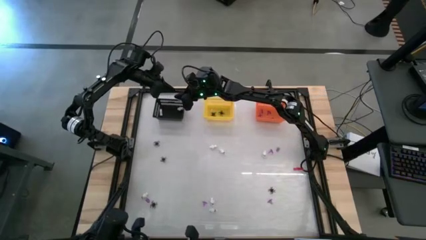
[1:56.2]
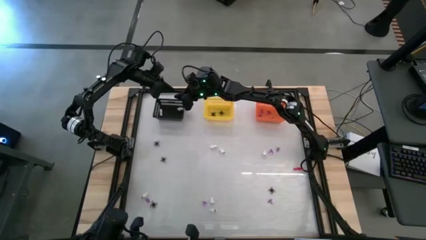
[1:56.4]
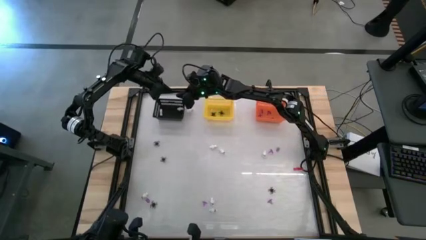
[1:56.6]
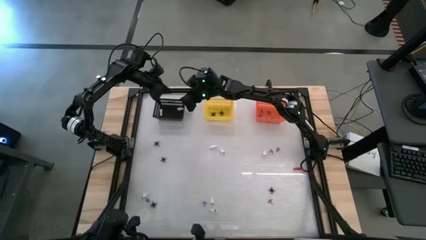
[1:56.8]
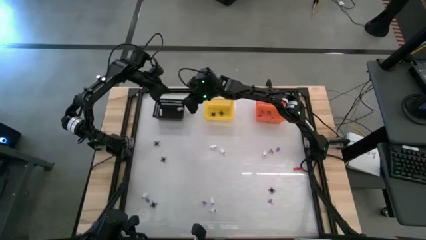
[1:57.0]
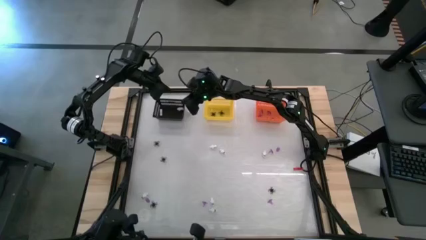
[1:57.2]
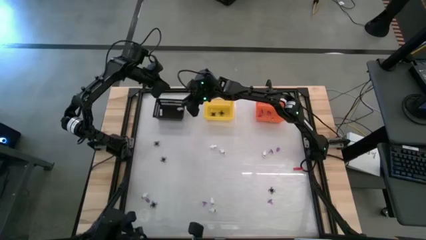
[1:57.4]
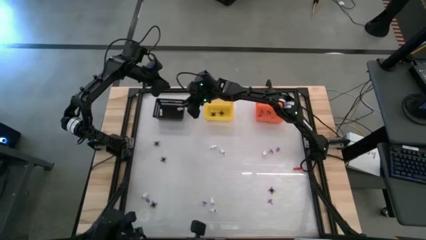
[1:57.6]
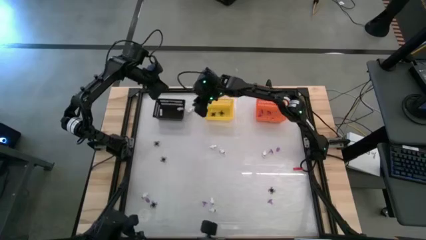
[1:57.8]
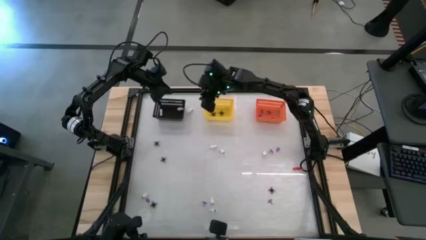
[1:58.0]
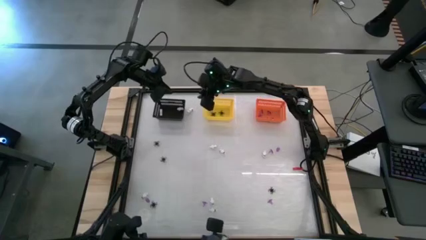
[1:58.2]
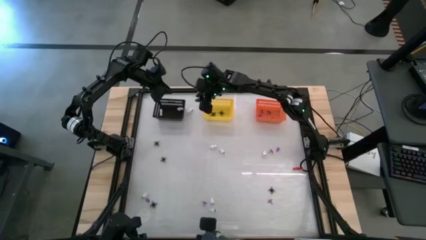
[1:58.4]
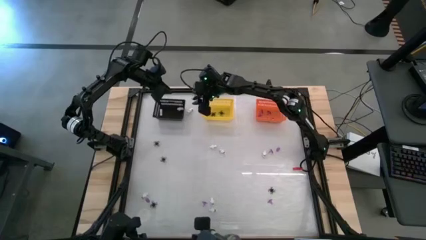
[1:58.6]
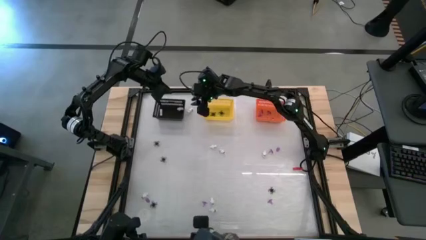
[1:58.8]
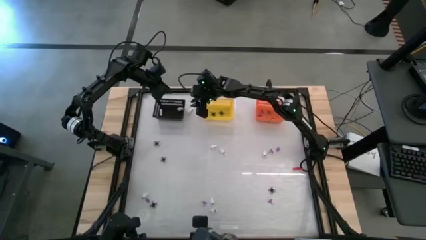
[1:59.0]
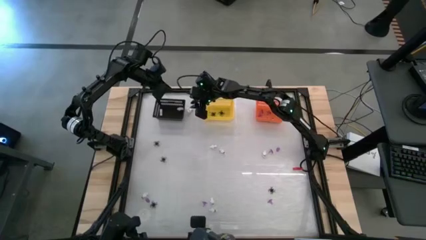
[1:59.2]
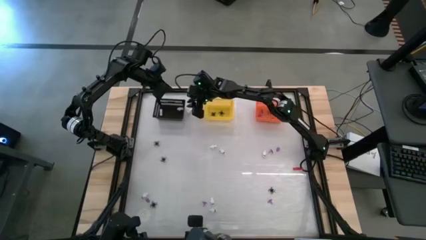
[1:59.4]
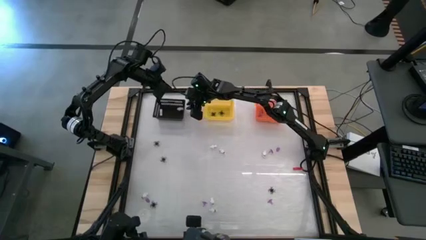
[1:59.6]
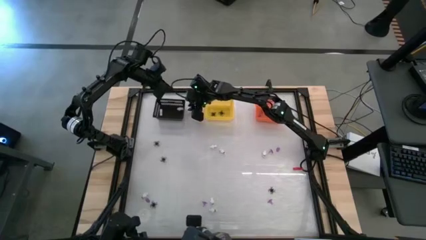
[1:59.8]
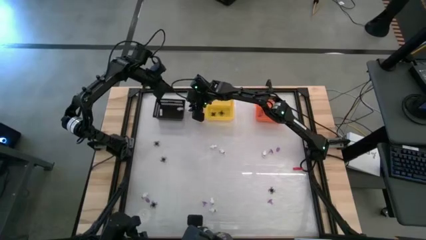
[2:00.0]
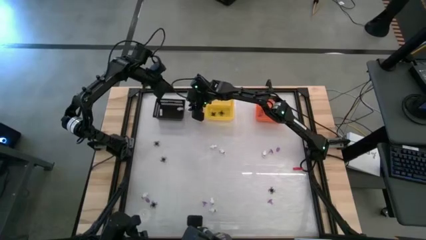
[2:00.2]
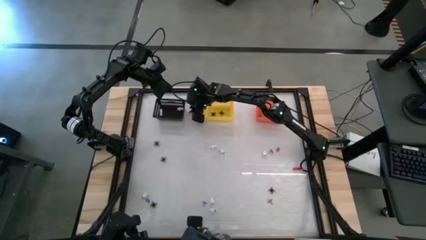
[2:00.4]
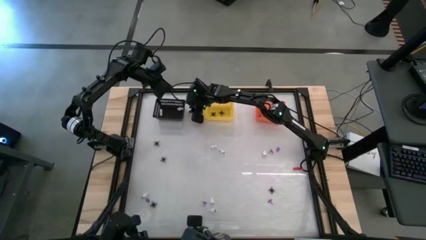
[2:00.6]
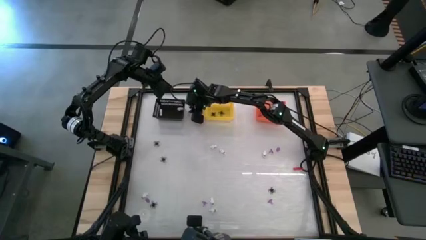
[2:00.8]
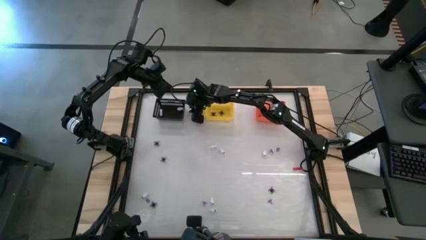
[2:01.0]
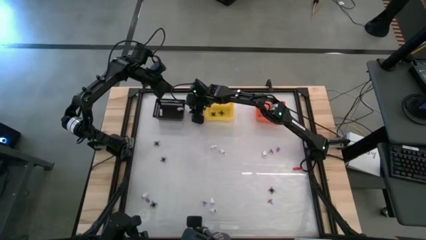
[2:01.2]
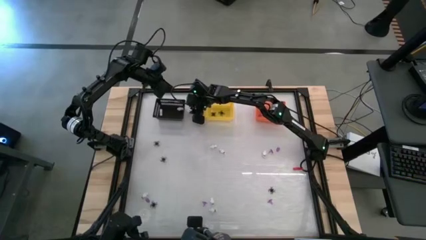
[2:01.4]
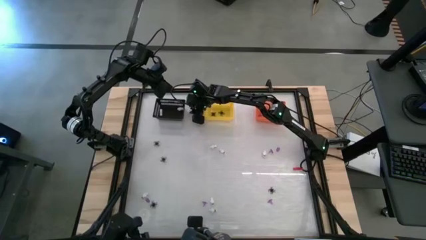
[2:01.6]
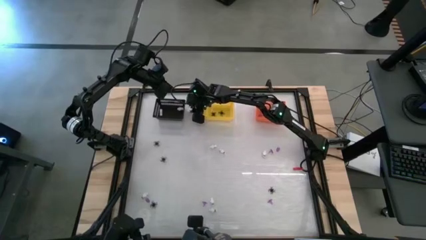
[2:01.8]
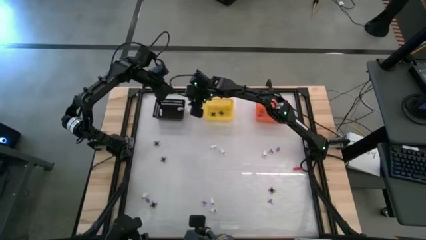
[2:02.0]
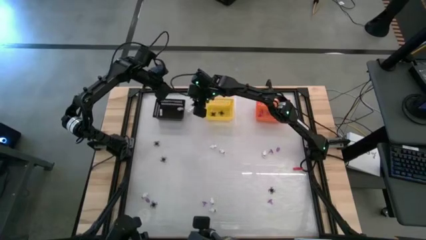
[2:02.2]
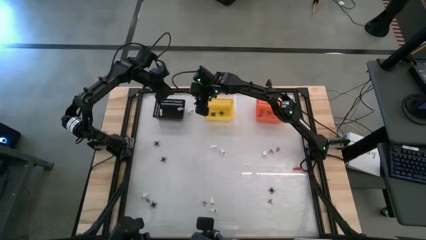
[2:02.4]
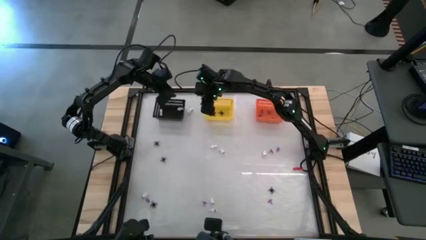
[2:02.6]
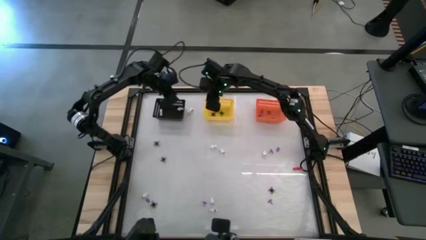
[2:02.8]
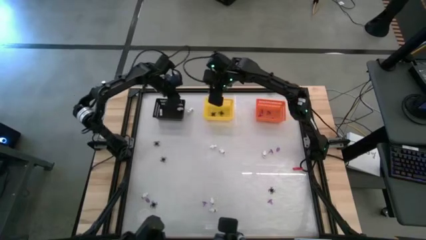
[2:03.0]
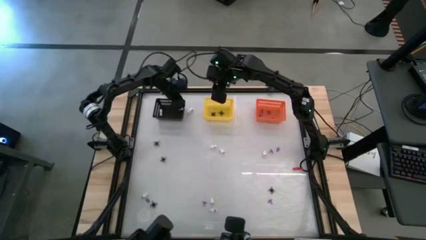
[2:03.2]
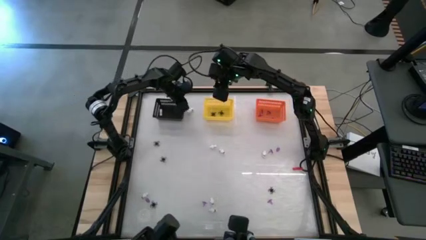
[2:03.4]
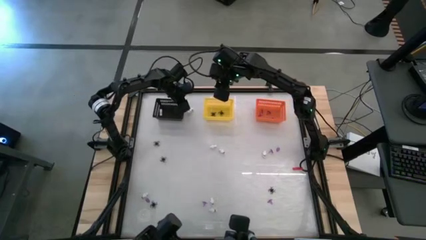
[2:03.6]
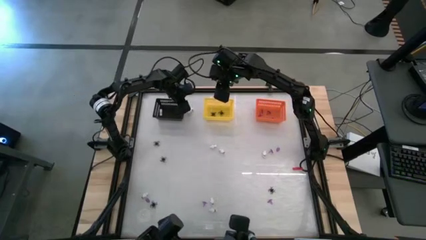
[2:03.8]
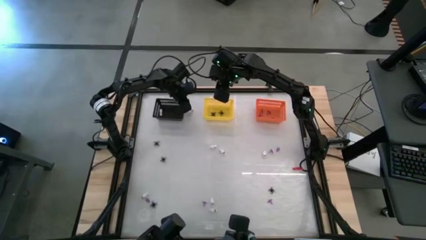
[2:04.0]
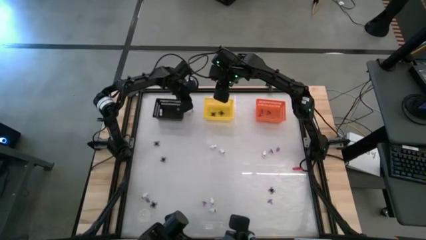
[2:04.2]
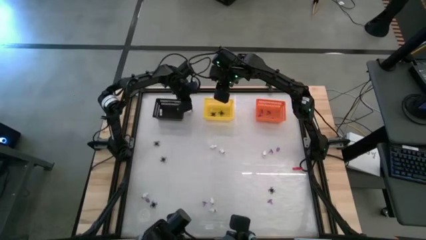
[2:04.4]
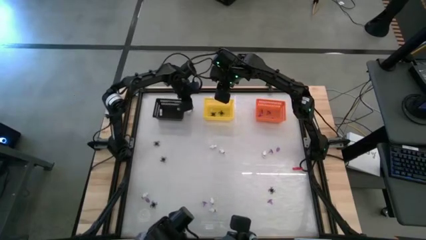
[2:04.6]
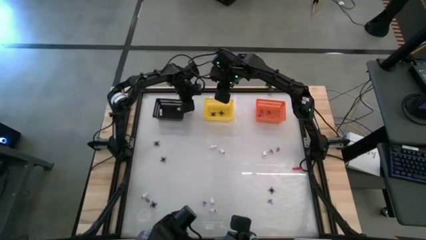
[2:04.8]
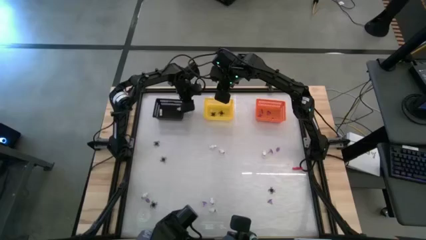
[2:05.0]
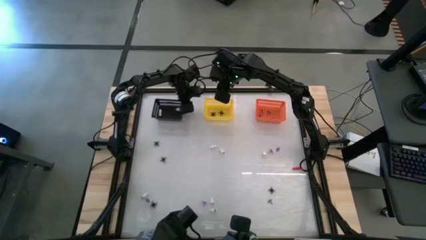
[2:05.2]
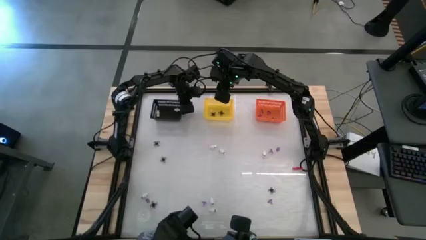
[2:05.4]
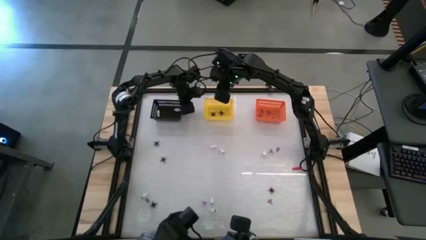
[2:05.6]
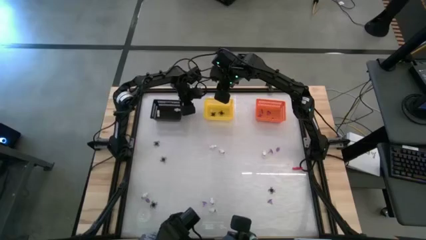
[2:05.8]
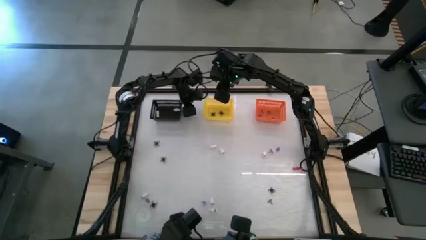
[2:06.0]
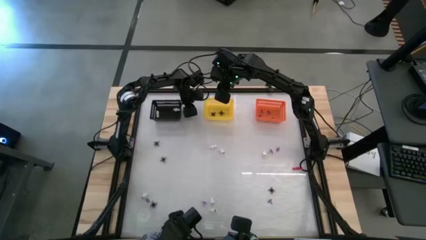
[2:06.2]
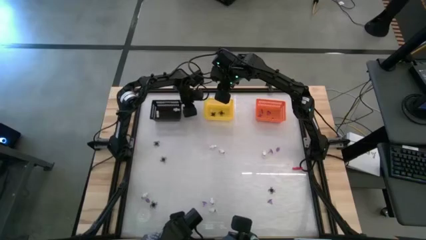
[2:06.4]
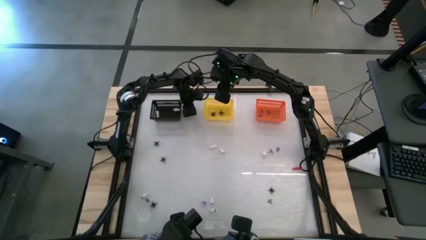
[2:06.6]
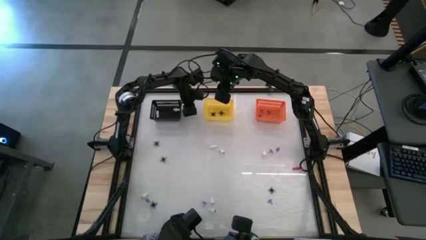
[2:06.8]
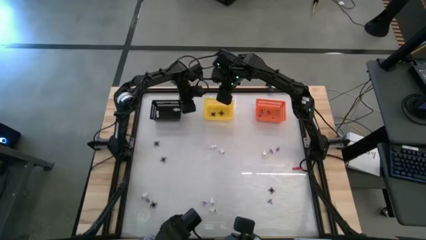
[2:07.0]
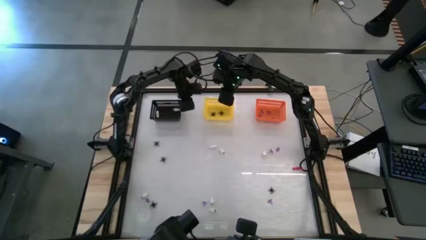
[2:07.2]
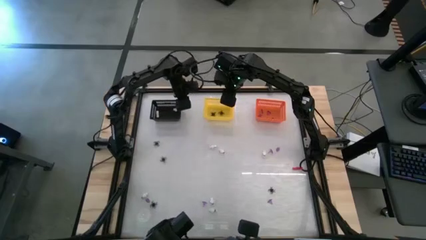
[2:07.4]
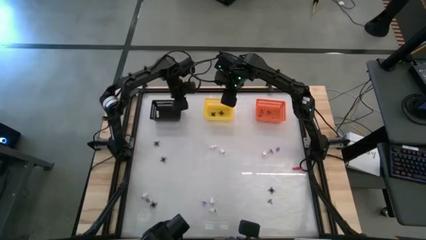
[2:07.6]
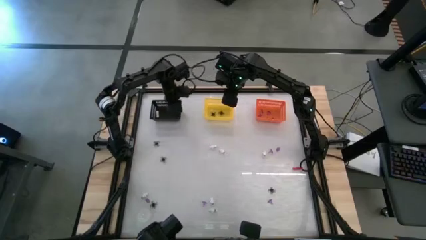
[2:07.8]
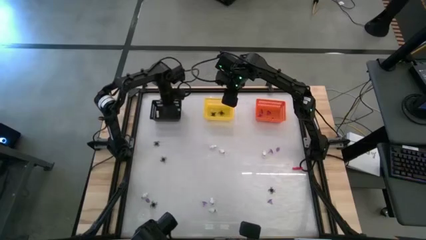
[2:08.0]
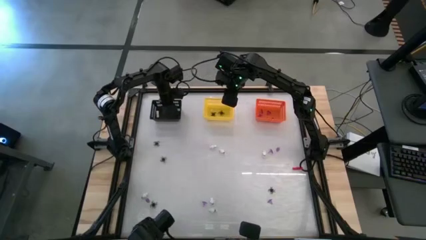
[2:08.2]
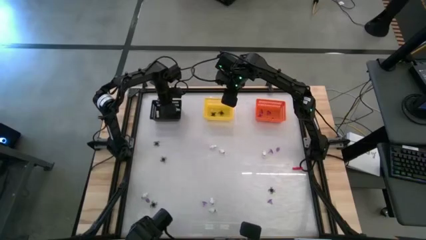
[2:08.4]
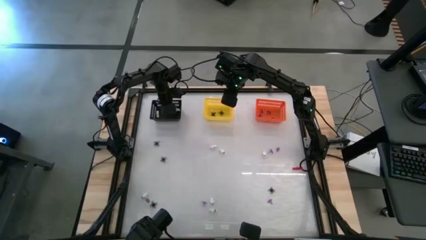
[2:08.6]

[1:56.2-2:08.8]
Task: Sort Halloween decoration
Put the white skeleton toy into the black basket
